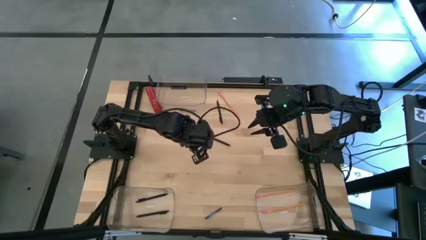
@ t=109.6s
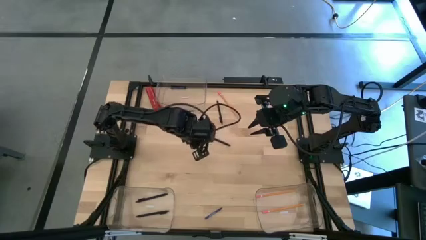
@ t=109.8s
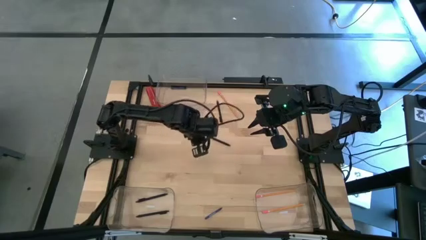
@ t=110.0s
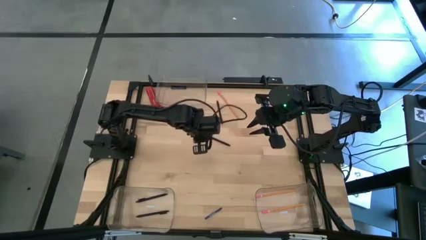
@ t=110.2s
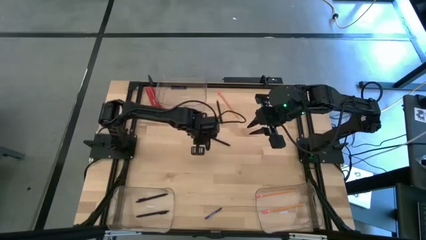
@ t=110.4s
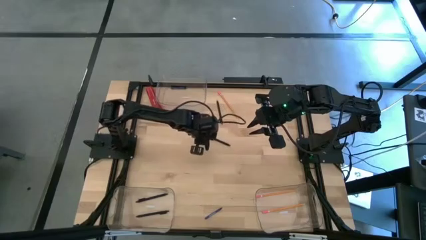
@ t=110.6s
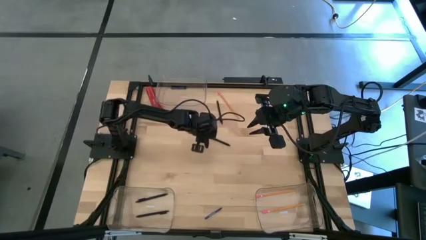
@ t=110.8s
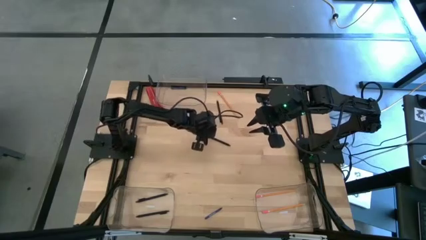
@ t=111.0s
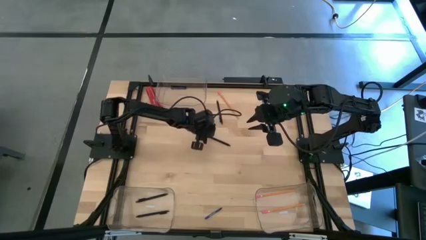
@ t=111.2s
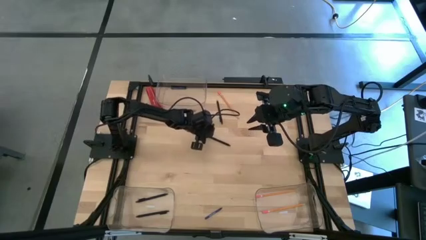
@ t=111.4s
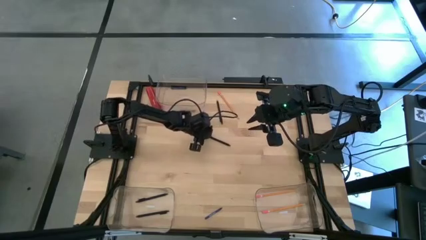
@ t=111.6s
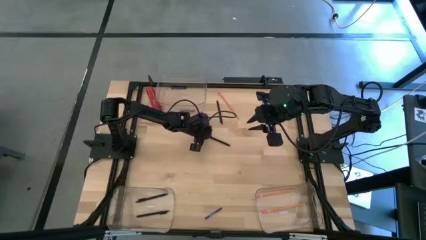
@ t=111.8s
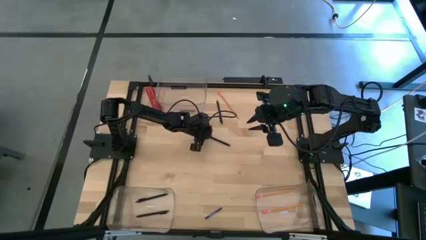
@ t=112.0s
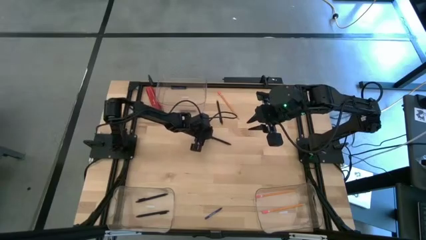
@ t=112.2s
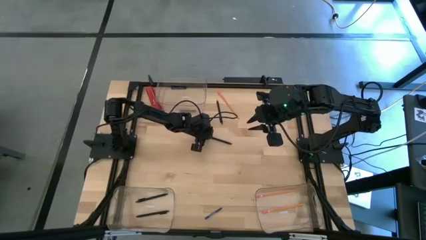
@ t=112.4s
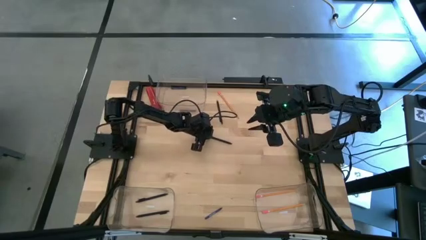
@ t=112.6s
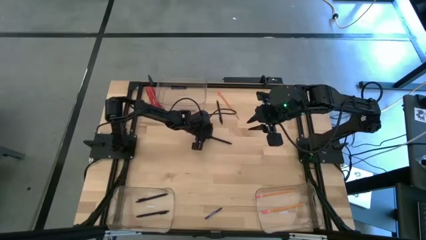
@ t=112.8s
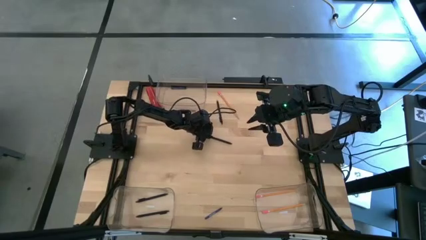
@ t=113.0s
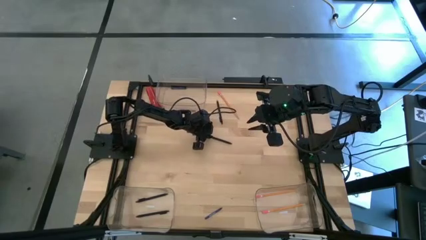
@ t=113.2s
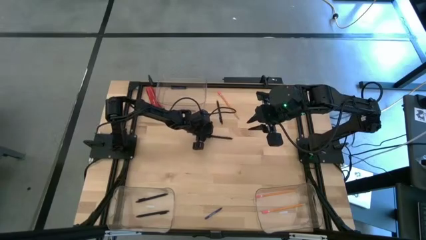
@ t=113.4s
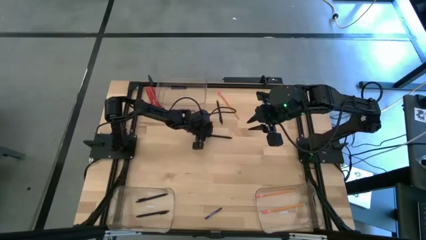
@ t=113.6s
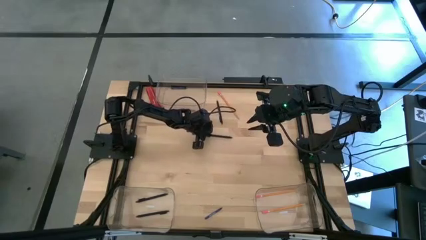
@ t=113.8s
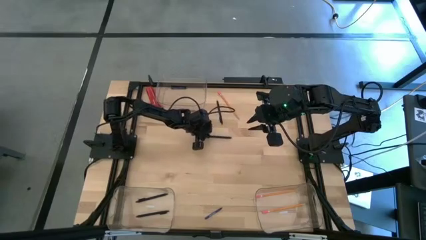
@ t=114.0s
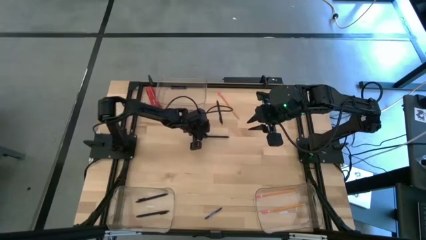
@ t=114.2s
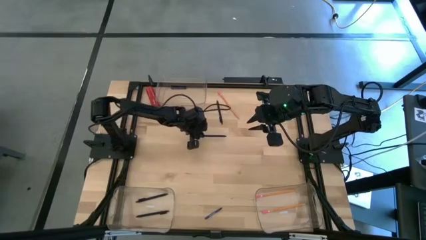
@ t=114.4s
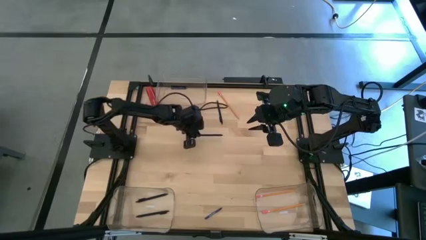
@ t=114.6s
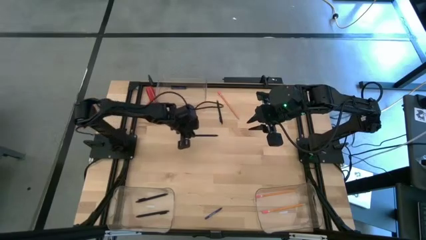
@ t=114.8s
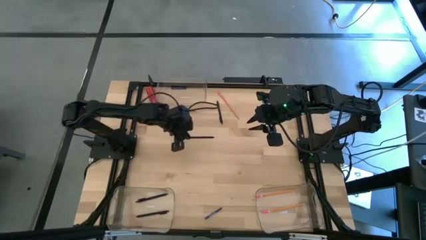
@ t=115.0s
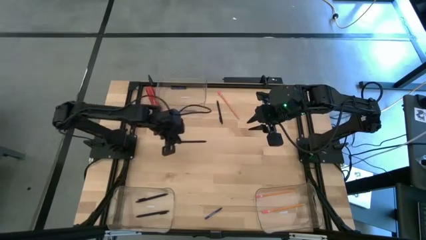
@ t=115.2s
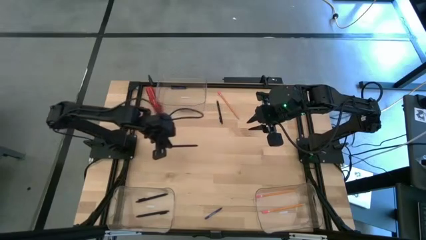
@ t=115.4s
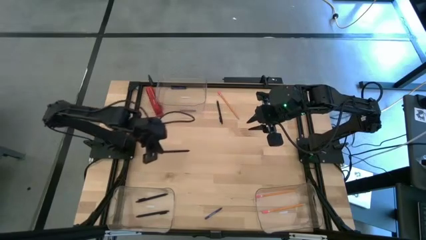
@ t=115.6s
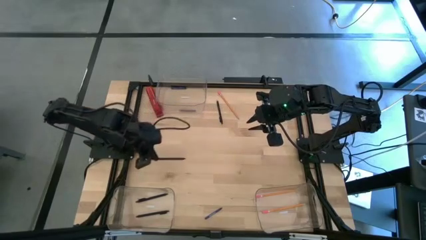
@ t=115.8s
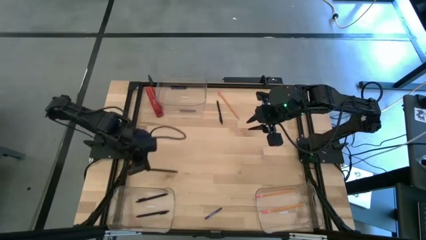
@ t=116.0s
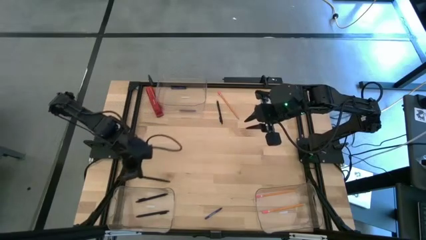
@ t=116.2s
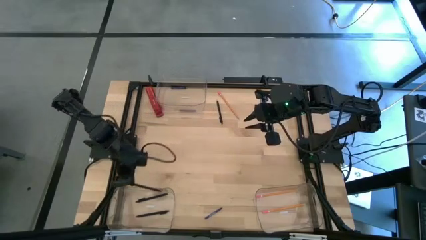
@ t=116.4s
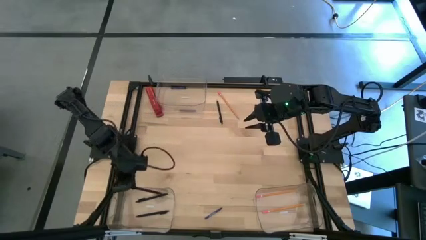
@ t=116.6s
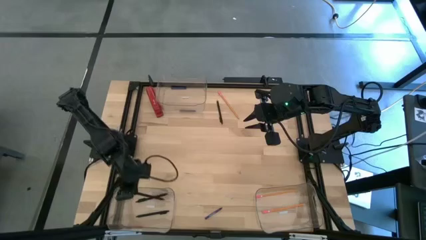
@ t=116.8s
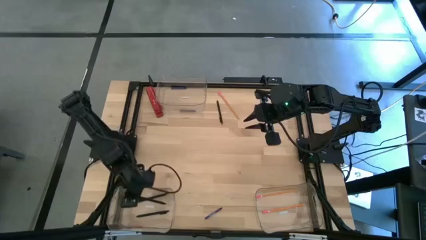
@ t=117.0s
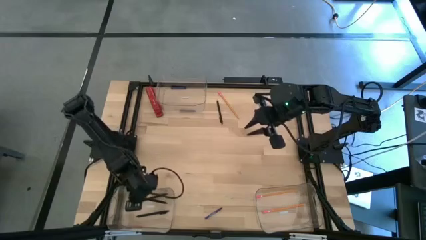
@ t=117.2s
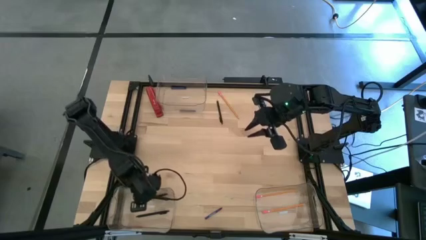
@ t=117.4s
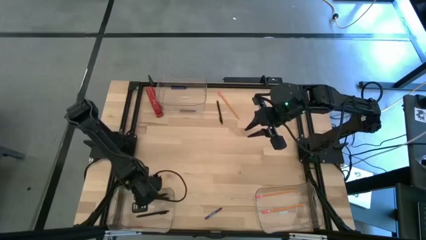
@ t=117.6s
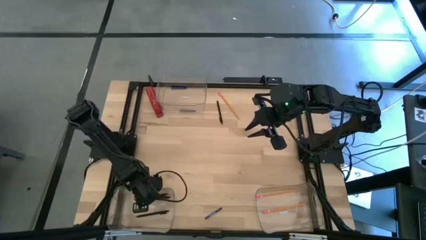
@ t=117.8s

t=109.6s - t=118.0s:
Task: Sort crayons/erasers/pens/pencils in bins
Put the black pen into the bottom left transparent bin

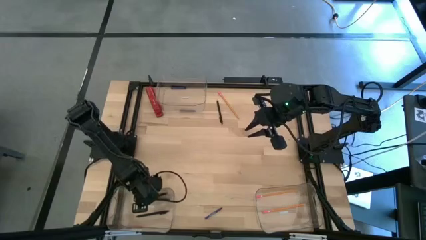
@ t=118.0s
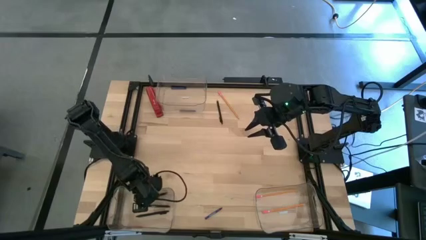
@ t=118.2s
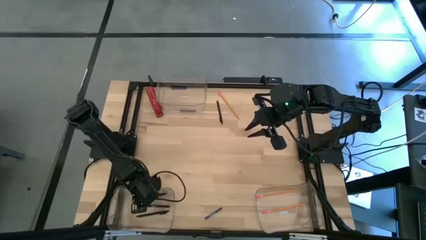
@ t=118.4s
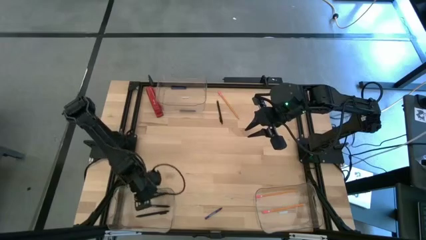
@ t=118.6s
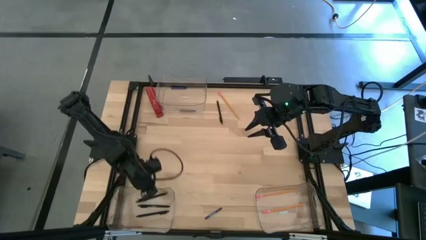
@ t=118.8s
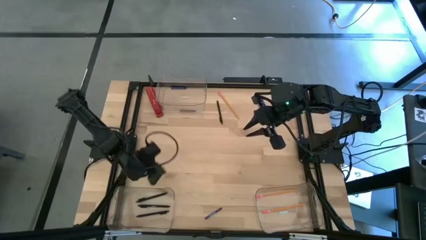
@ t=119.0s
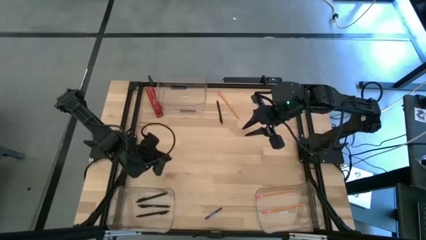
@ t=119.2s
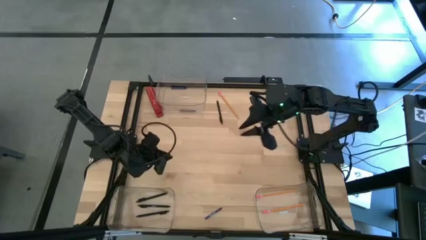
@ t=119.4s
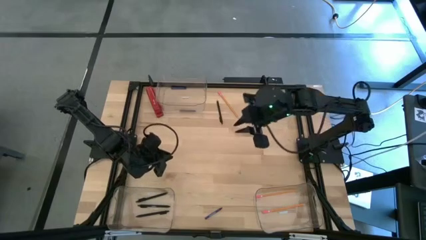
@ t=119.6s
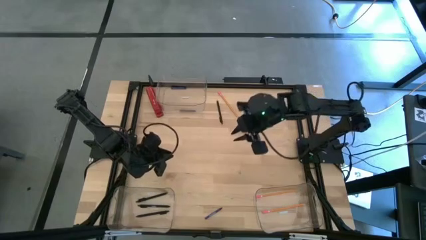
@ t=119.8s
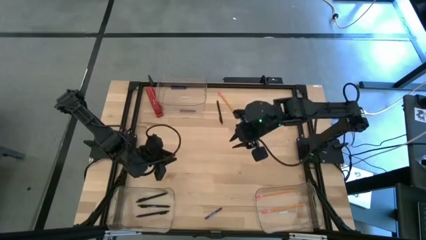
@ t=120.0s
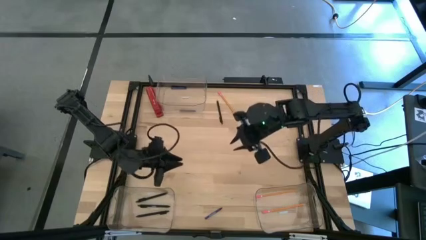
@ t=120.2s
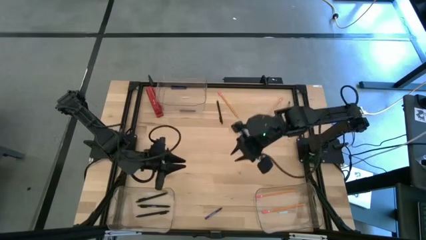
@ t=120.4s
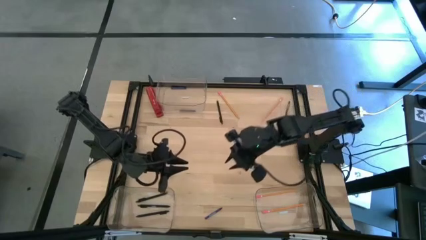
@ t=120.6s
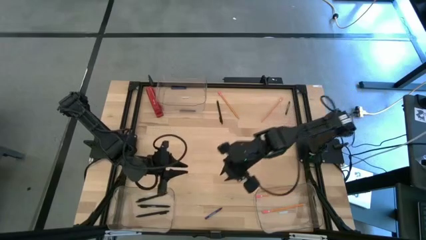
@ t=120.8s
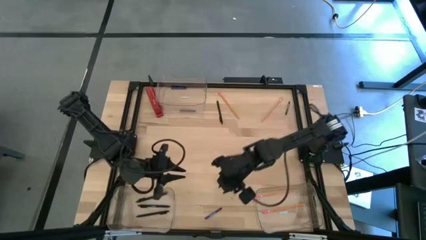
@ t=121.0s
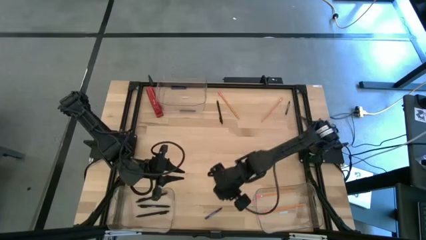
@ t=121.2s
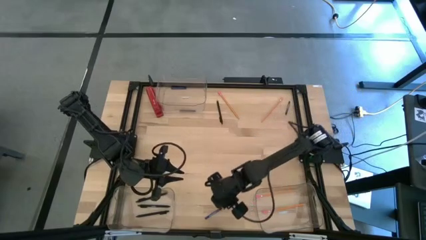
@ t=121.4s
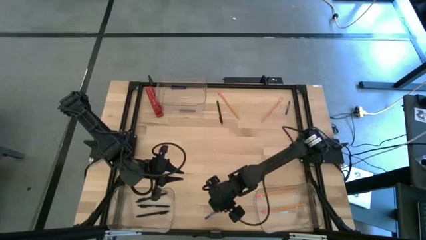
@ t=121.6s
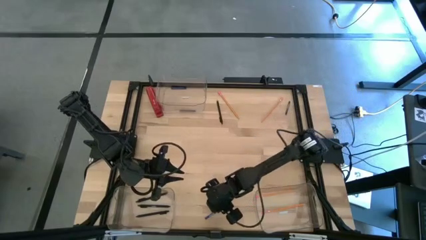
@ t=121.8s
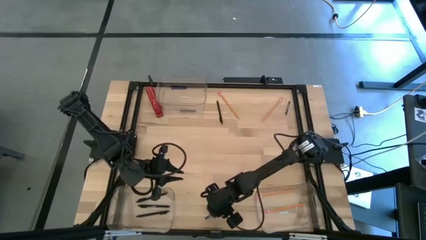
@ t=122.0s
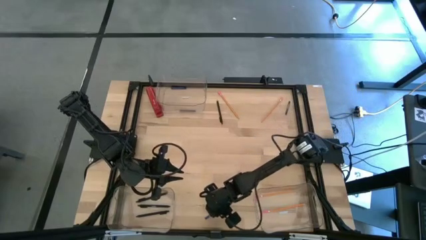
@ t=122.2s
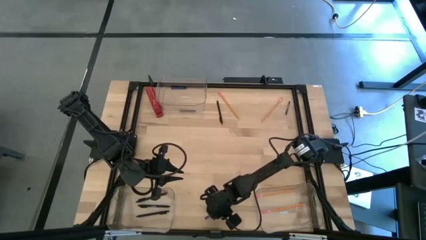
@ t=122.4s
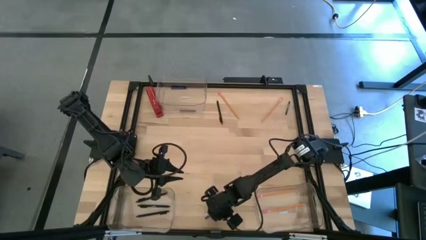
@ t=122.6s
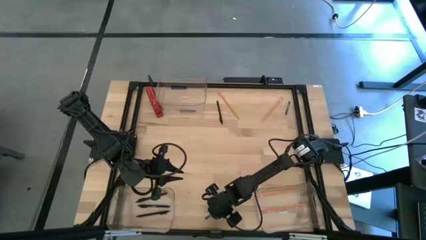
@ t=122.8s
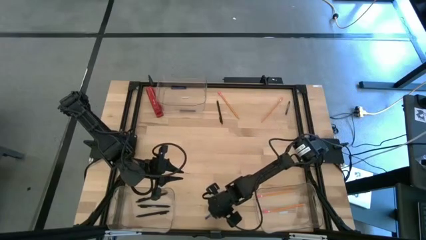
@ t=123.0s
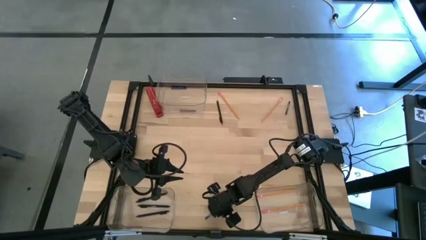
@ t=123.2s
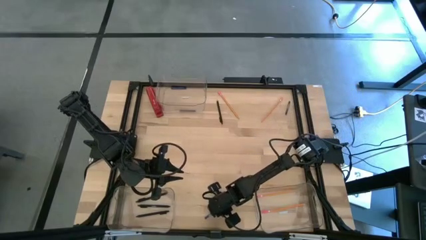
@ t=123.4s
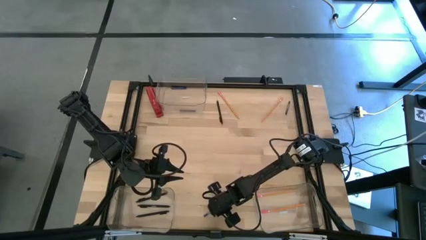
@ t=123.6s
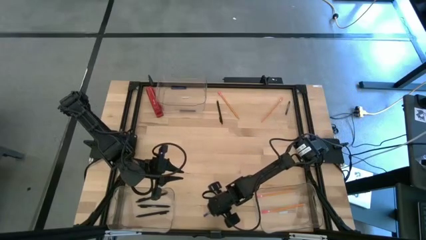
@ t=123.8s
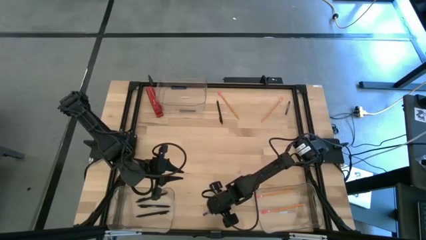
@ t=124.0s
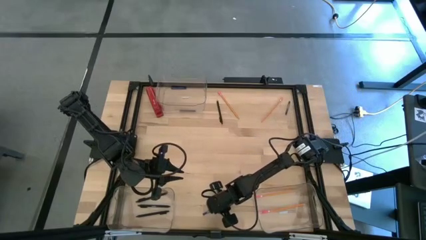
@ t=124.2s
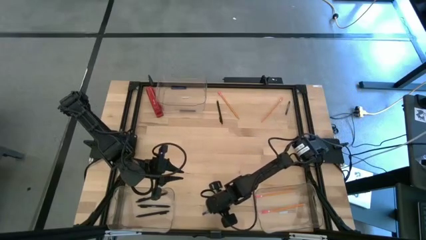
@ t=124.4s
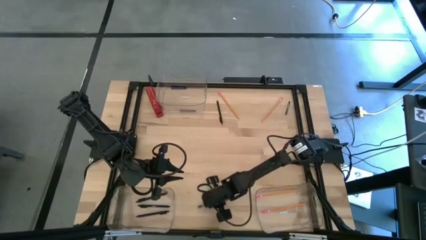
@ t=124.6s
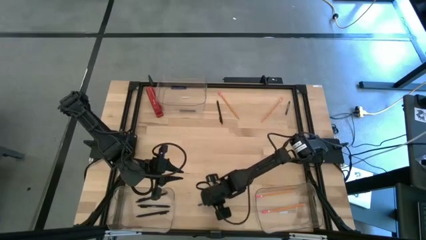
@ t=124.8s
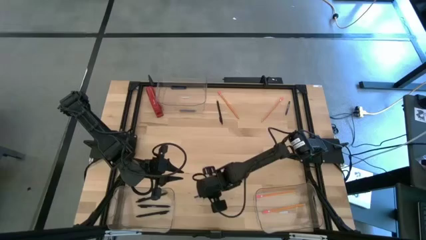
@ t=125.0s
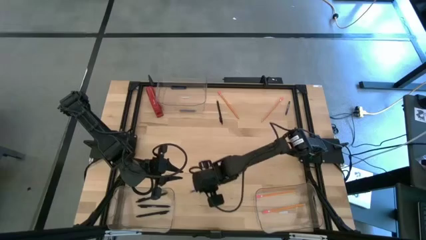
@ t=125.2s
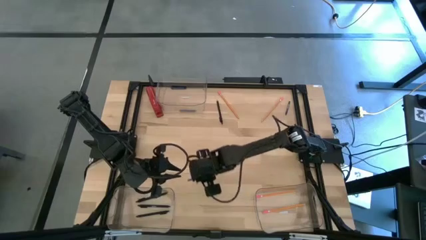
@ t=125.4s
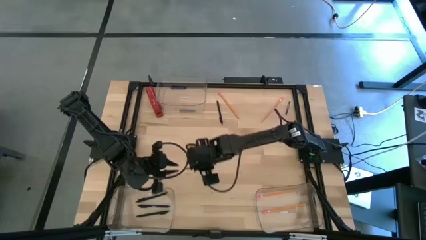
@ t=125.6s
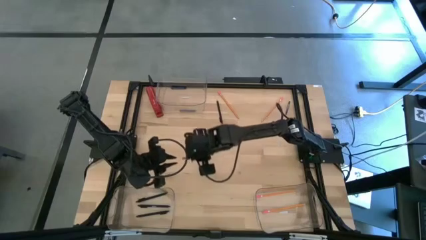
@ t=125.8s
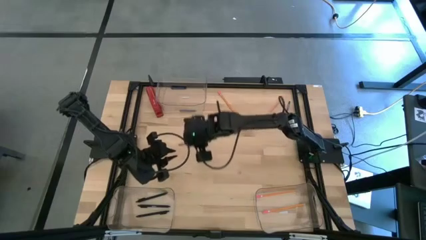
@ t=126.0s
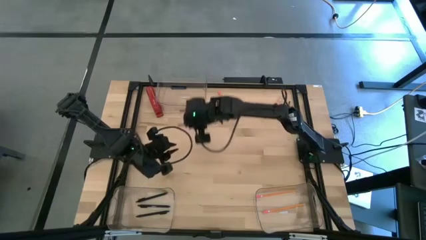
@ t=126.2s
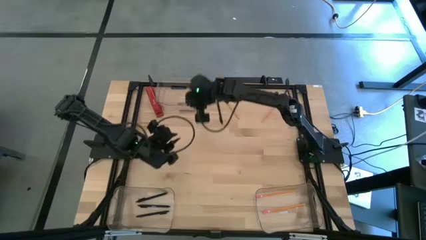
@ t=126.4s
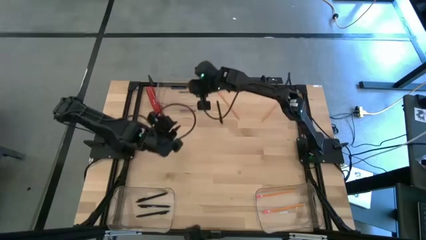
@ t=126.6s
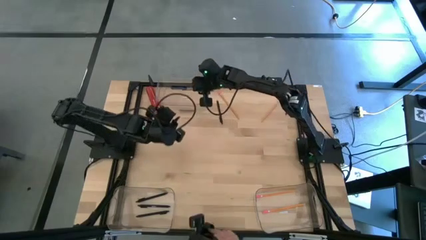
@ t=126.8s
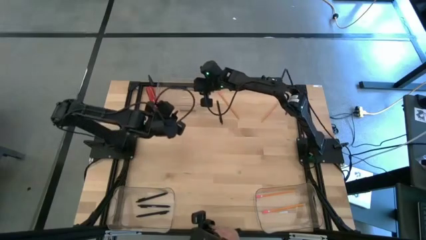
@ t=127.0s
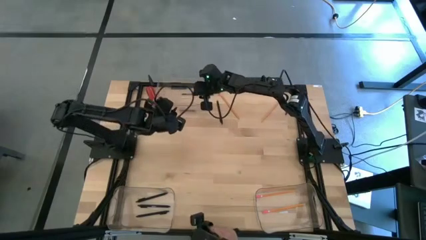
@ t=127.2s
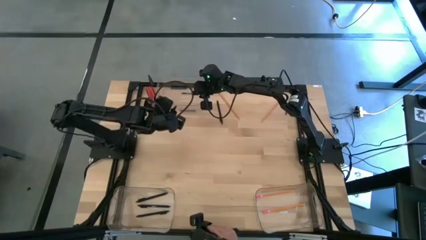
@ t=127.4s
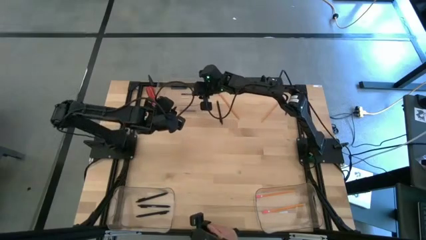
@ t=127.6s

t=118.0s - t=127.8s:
Put the blue crayon into the top transparent bin
